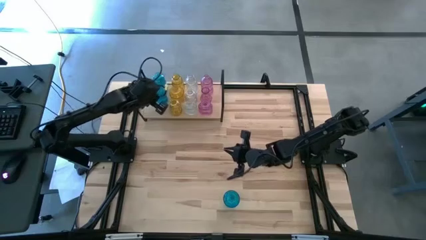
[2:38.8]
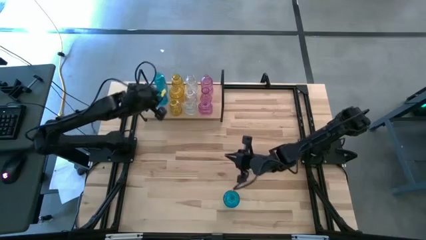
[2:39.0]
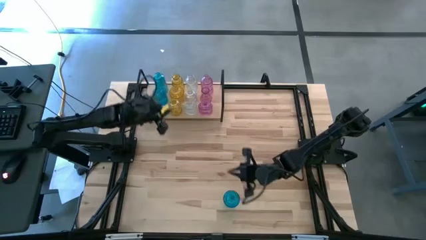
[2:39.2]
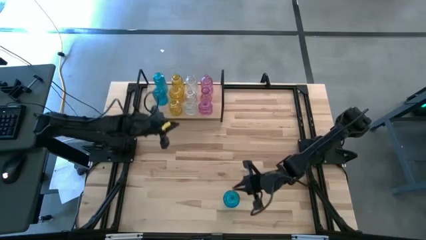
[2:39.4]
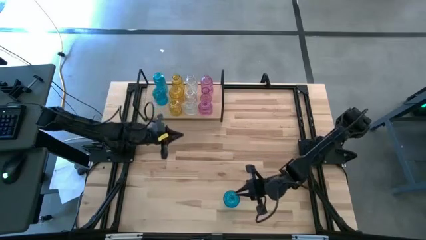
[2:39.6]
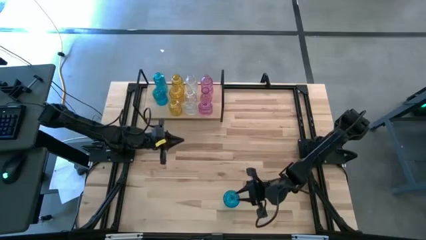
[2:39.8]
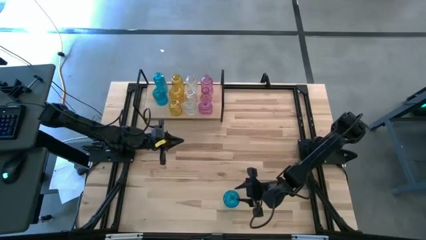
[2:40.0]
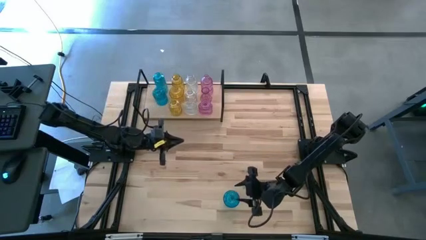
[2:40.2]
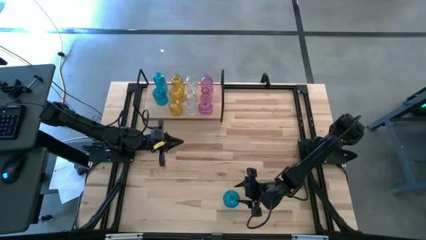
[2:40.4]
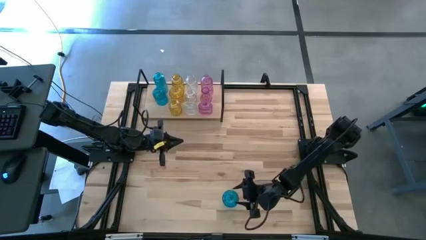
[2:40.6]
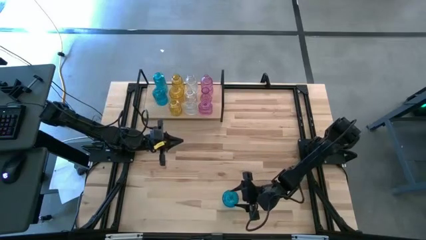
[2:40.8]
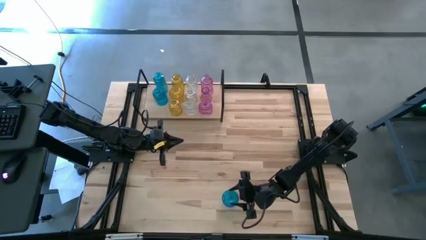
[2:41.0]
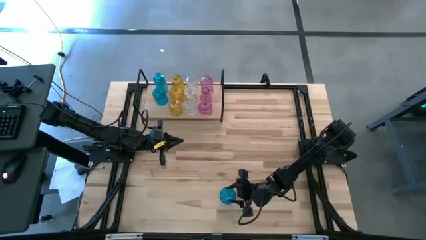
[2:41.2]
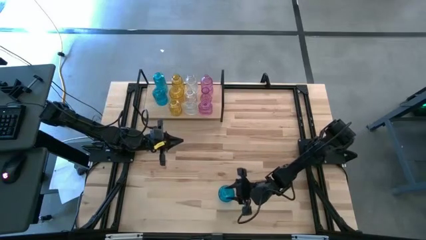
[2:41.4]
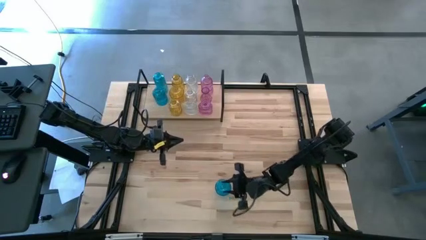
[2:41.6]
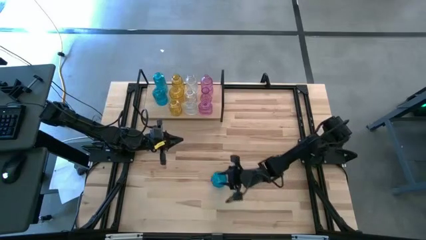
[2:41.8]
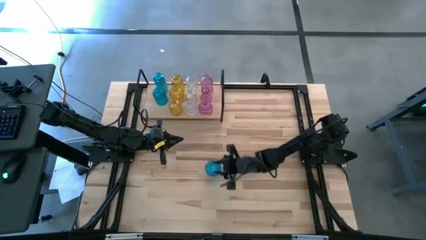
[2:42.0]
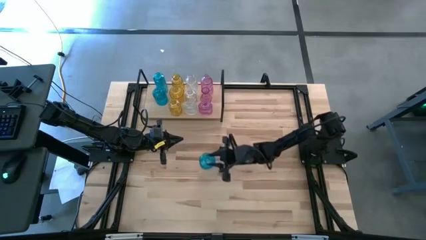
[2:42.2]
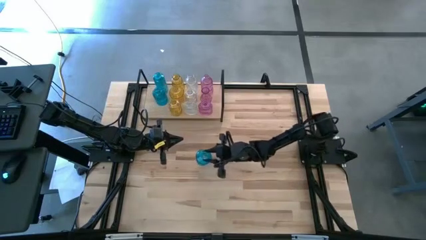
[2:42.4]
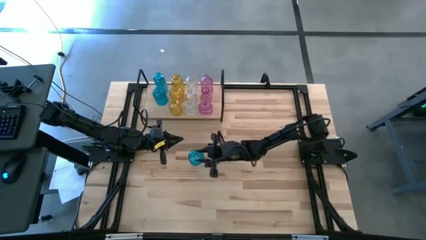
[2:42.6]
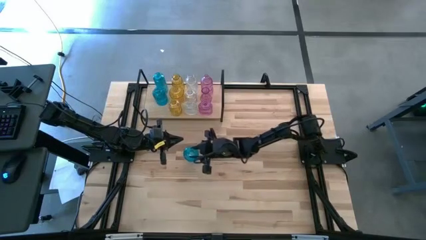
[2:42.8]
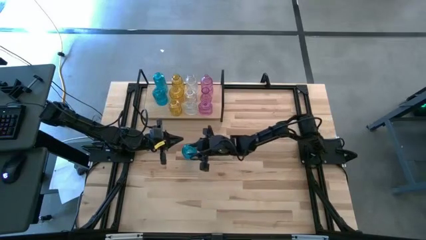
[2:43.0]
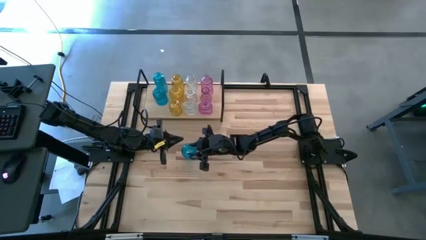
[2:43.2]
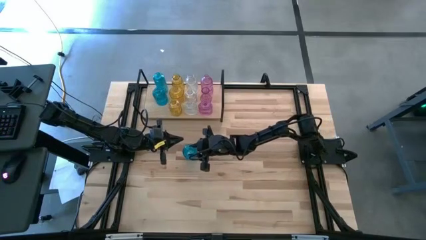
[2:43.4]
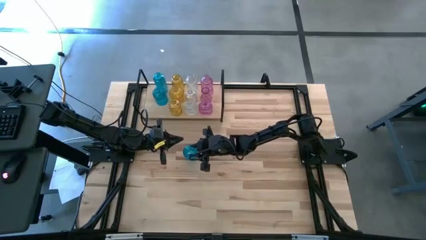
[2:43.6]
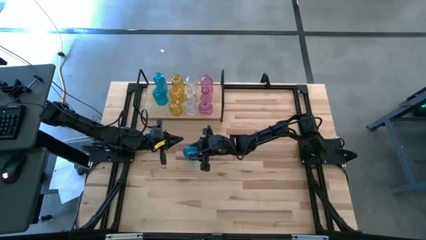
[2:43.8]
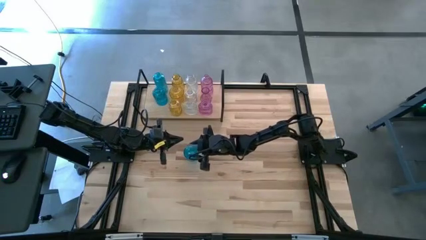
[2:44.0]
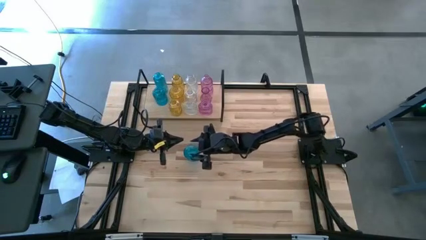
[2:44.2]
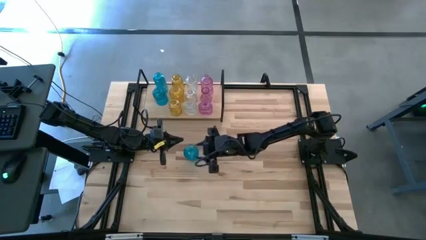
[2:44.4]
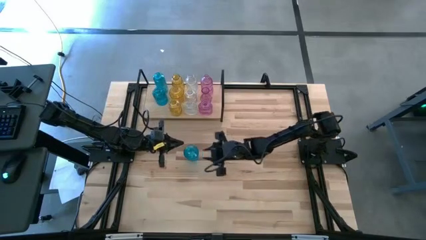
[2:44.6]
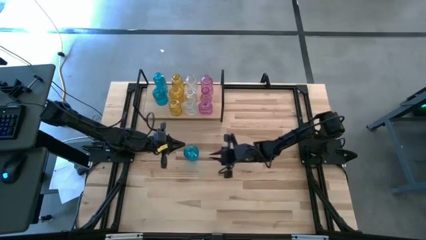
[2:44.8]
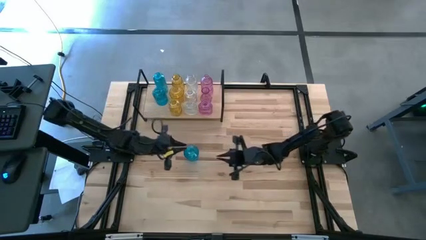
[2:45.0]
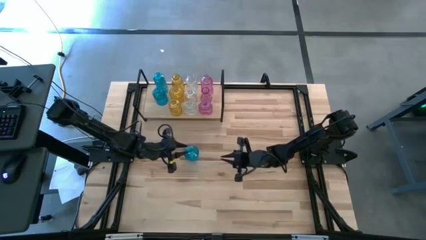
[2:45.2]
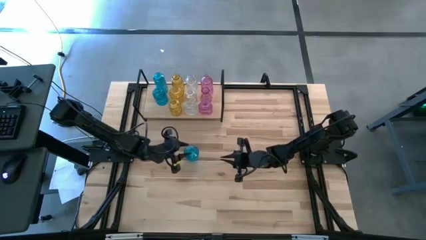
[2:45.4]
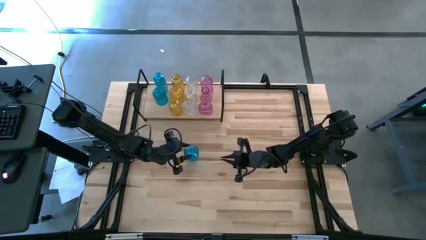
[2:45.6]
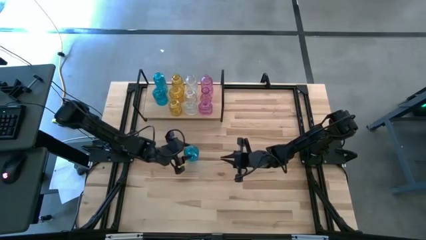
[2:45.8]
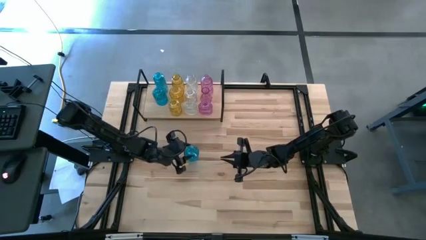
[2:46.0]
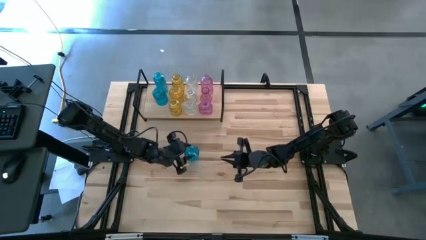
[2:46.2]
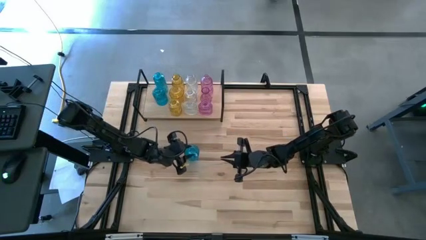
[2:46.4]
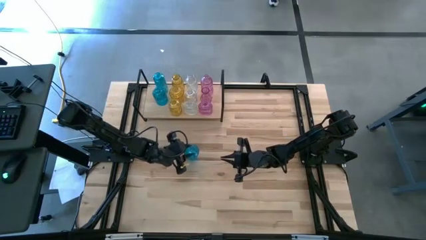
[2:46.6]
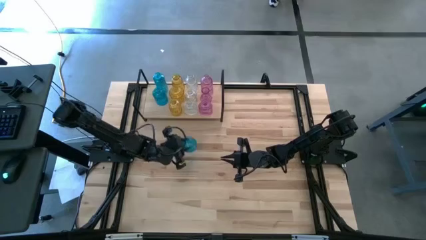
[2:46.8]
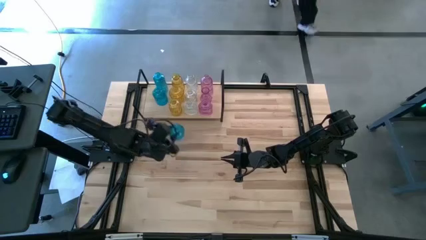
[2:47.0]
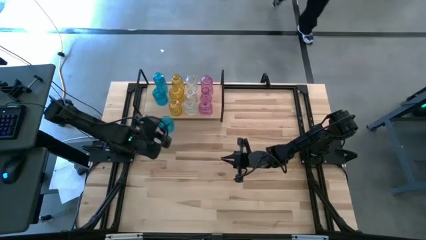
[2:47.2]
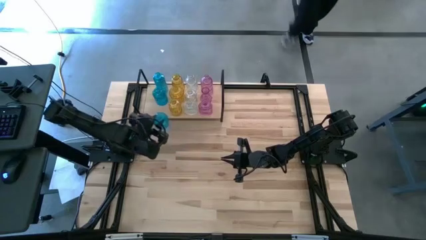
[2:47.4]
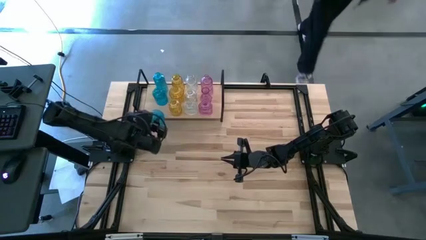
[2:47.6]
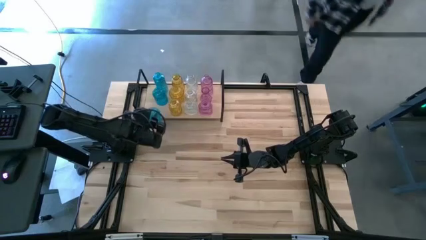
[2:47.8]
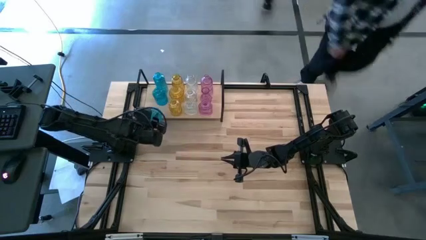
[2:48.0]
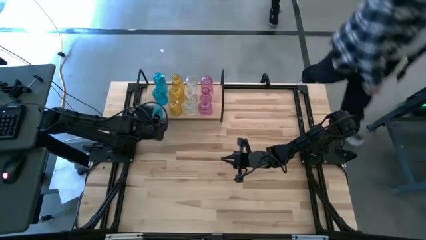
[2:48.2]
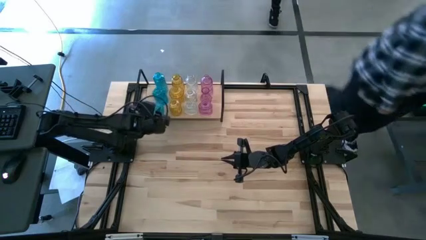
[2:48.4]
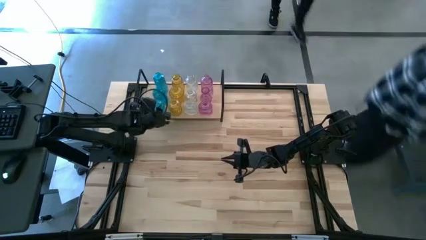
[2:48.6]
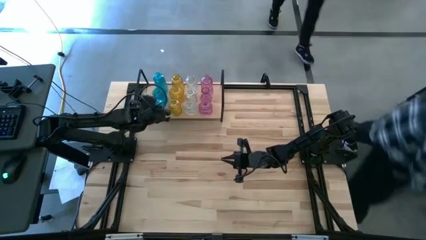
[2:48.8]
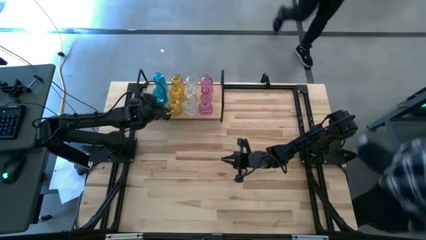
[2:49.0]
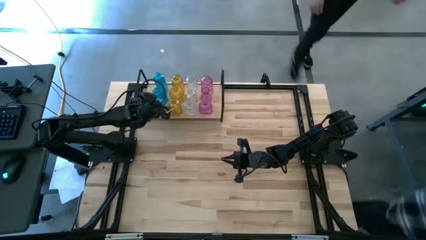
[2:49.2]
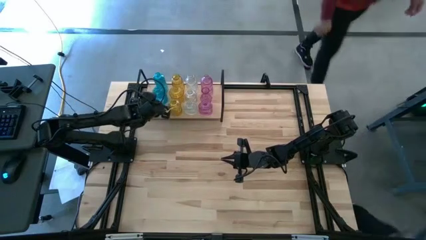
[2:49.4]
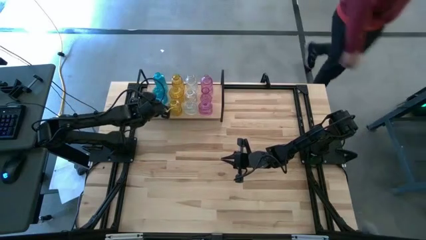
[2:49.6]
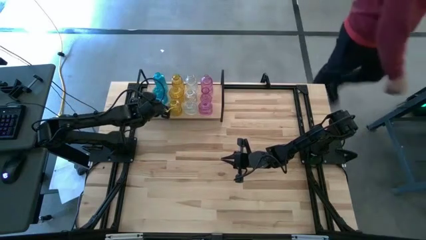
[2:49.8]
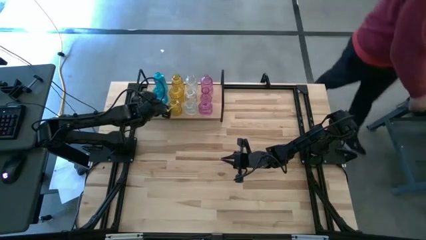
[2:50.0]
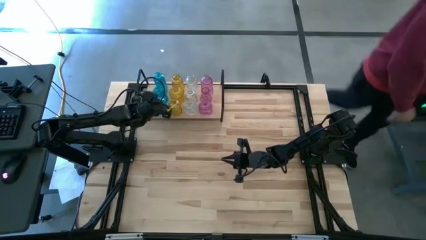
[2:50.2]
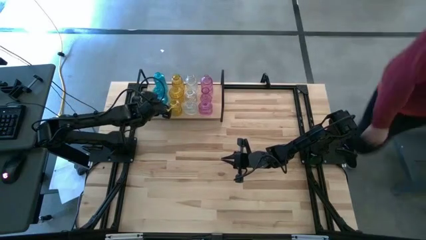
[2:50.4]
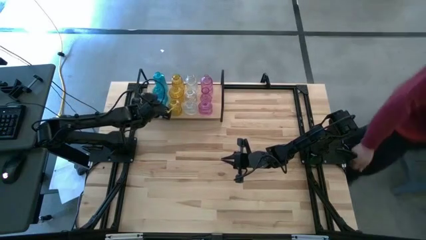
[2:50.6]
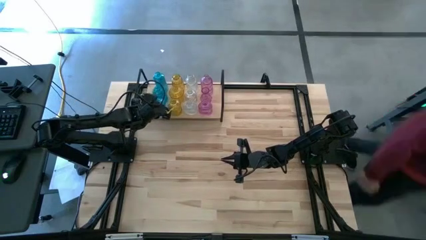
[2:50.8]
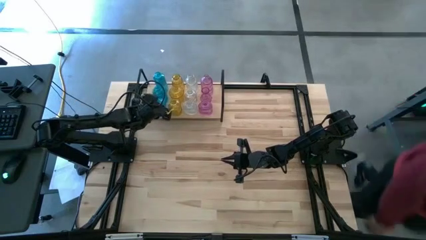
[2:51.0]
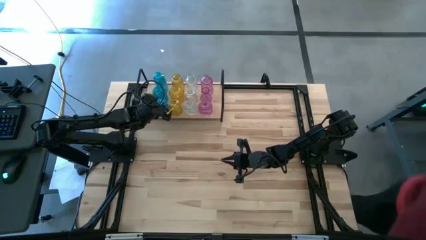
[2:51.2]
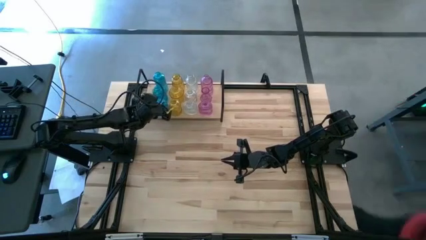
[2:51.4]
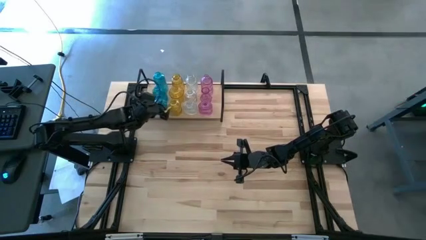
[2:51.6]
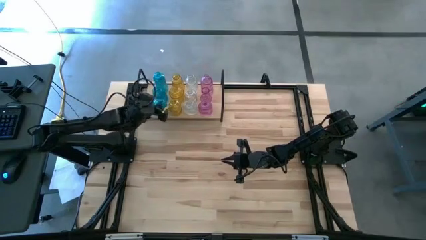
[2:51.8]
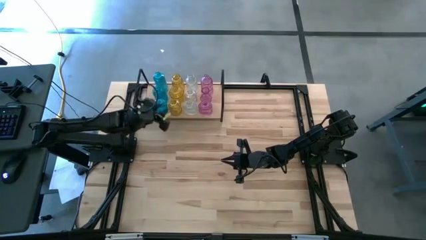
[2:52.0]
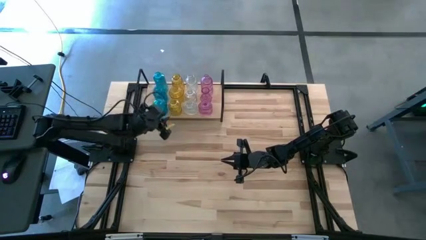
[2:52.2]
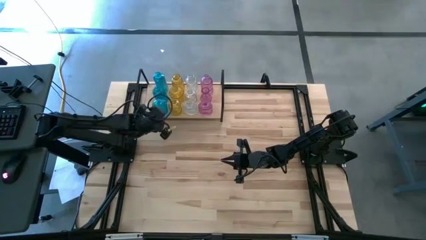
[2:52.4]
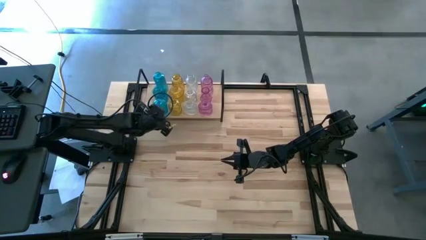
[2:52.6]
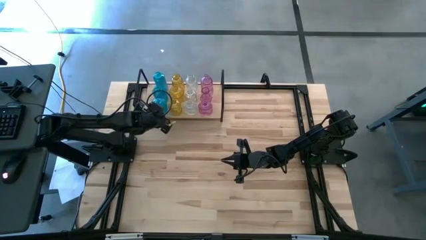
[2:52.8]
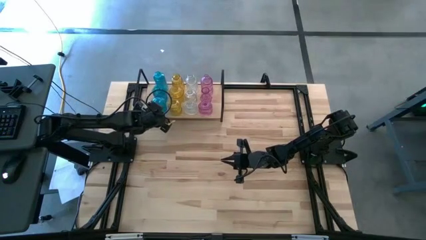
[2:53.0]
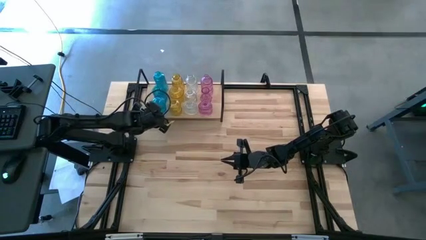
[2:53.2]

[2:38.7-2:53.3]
Task: sort vases onto shelf
Put the blue vase on the shelf

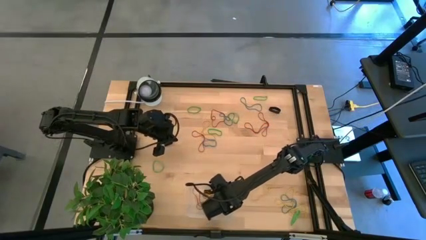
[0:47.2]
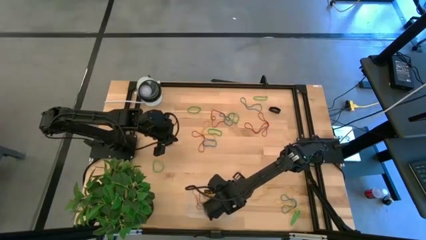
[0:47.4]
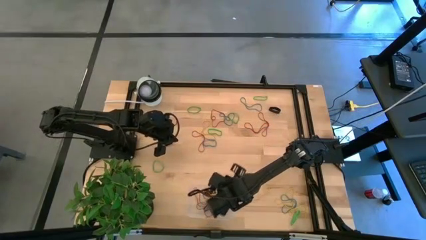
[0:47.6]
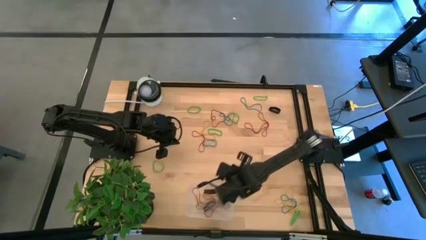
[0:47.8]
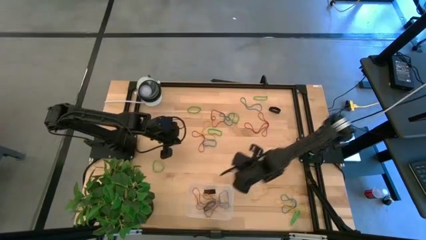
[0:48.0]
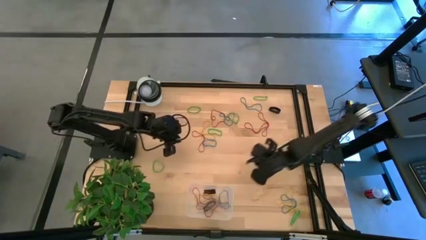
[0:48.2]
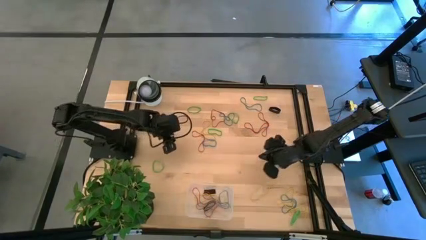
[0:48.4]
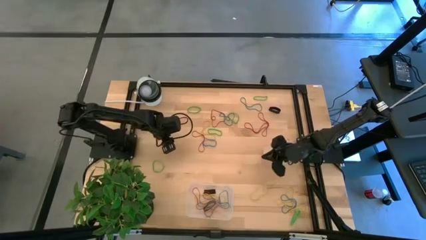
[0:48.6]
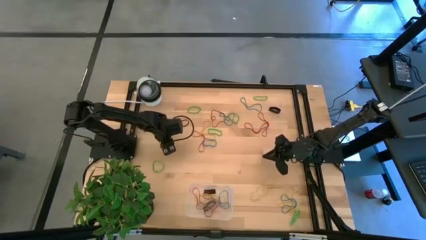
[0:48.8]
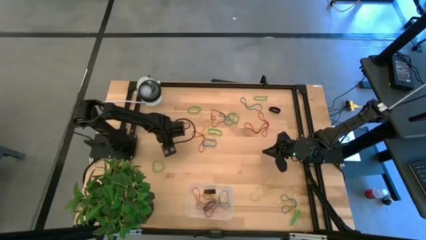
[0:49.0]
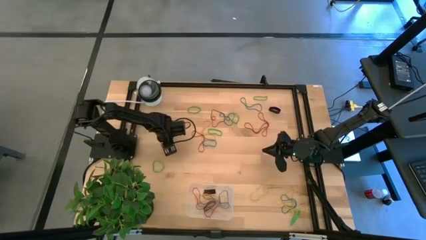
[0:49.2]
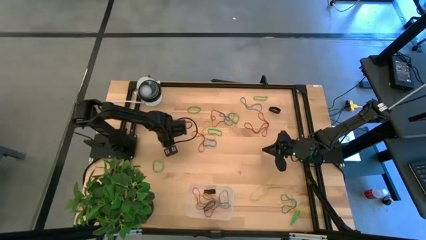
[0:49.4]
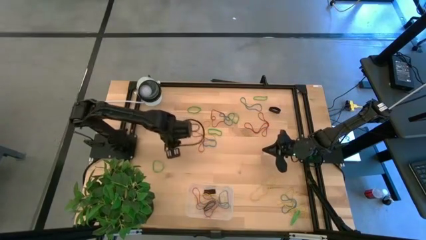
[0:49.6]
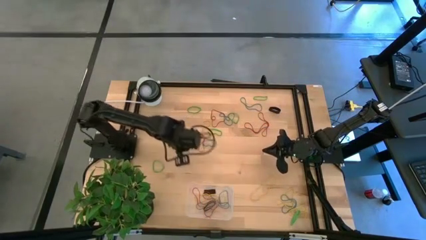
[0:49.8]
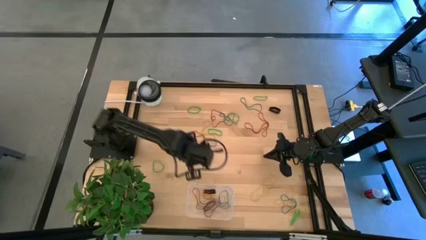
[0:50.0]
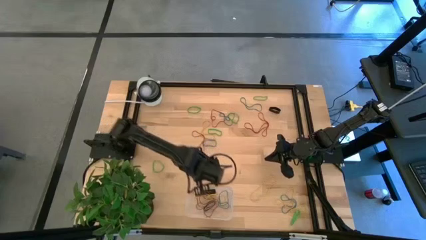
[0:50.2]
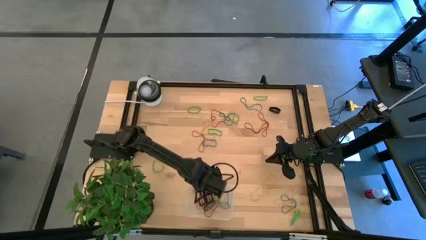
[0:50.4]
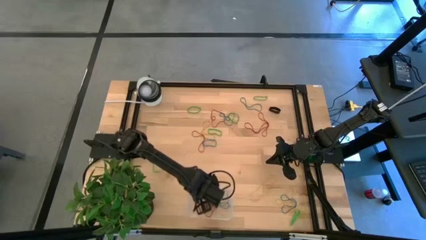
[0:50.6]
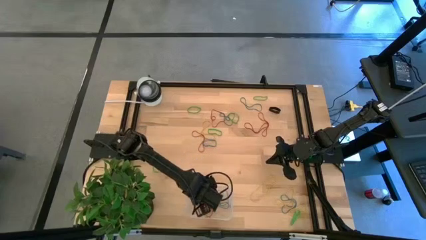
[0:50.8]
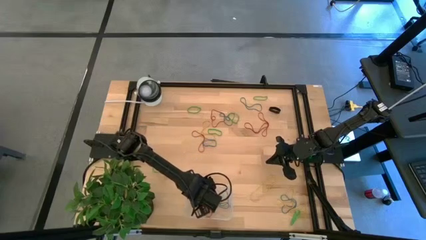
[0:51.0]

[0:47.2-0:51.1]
Task: Pick and place rubber bands into bin
Put the black rubber band into the transparent bin
